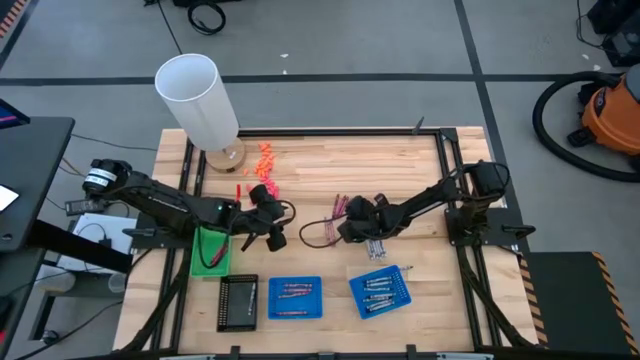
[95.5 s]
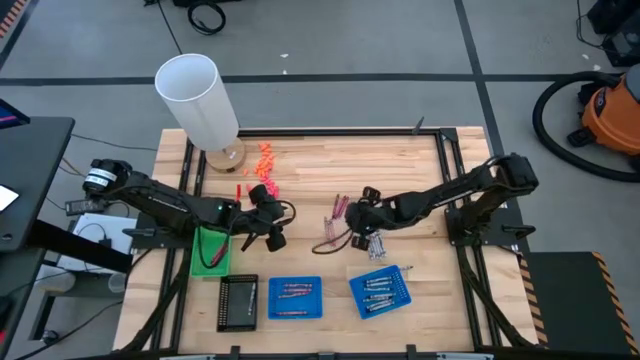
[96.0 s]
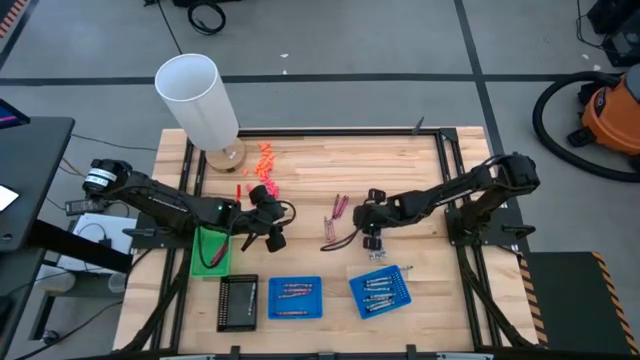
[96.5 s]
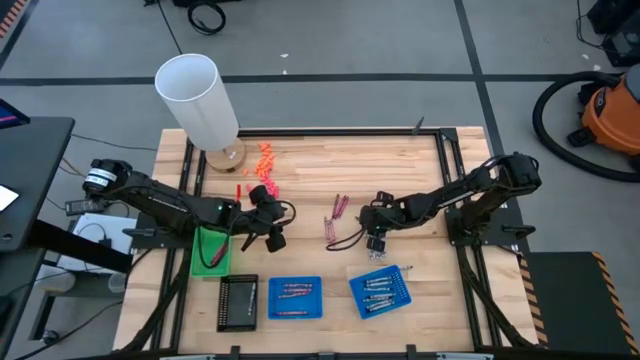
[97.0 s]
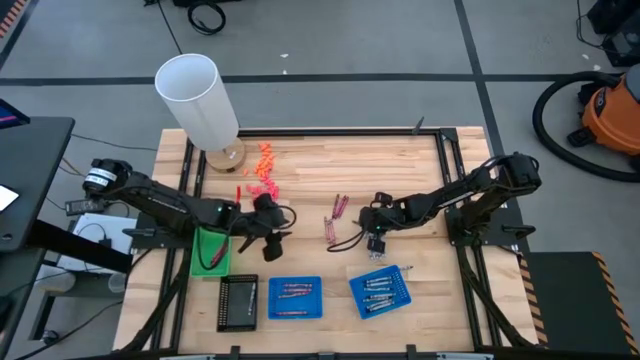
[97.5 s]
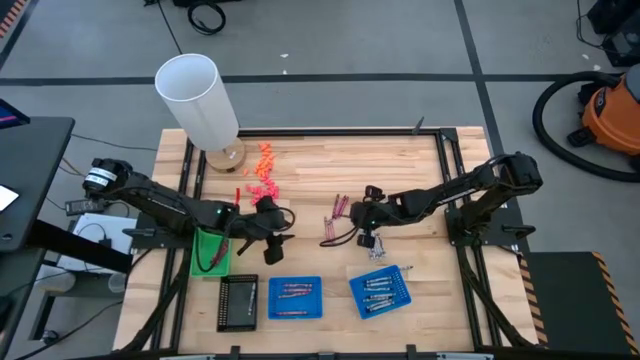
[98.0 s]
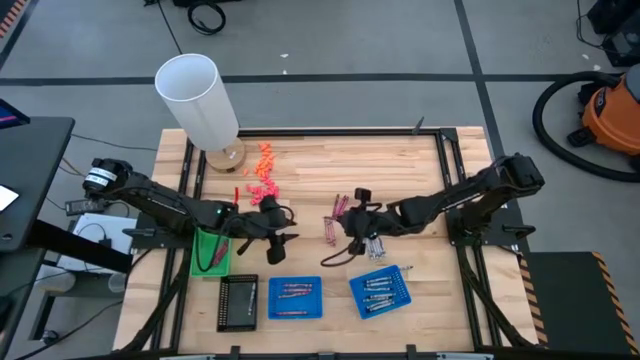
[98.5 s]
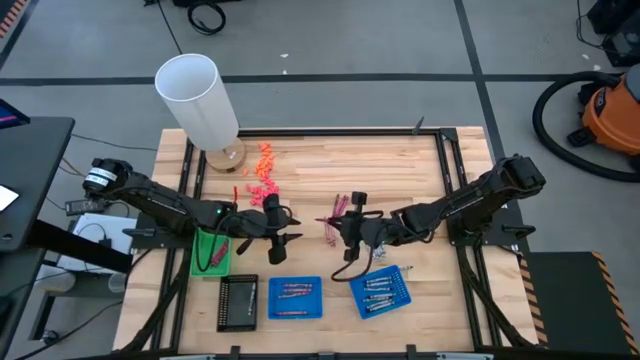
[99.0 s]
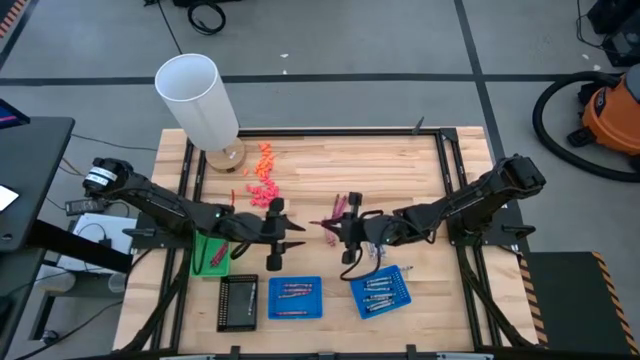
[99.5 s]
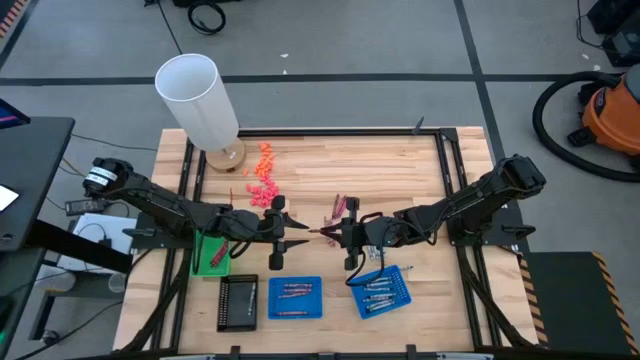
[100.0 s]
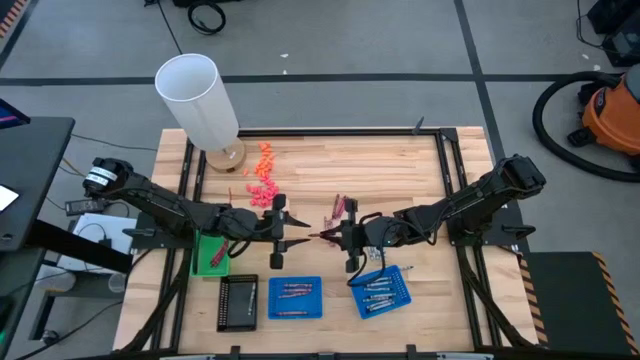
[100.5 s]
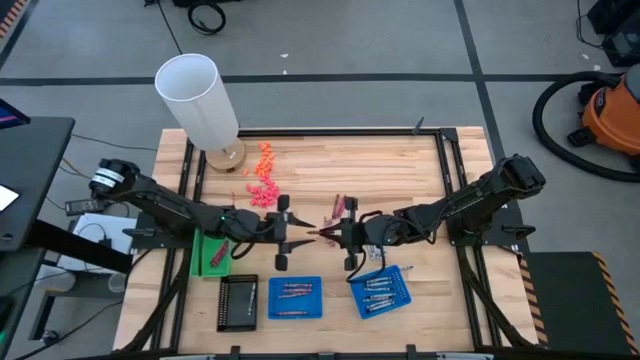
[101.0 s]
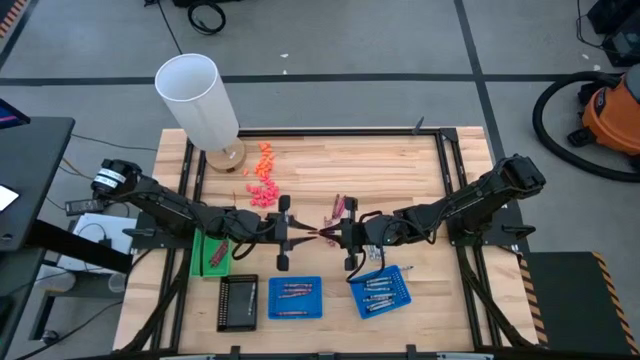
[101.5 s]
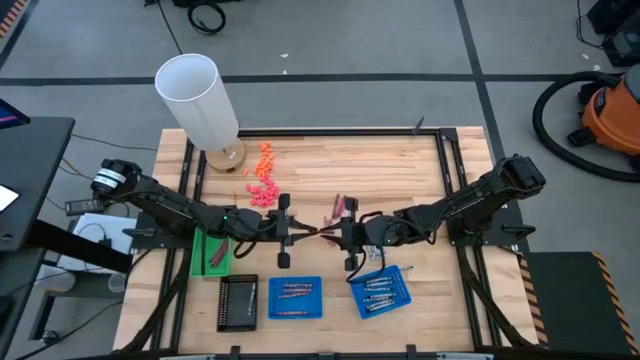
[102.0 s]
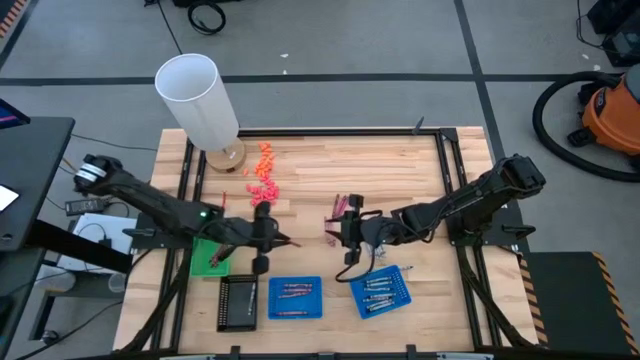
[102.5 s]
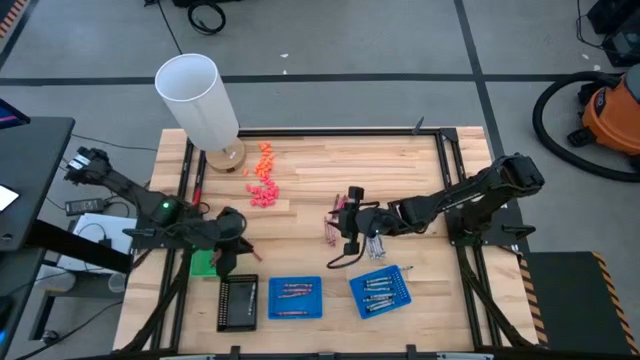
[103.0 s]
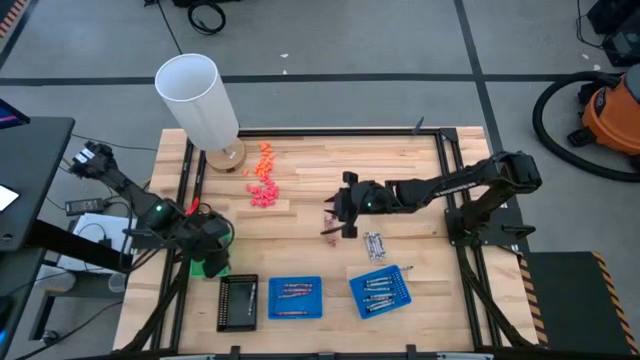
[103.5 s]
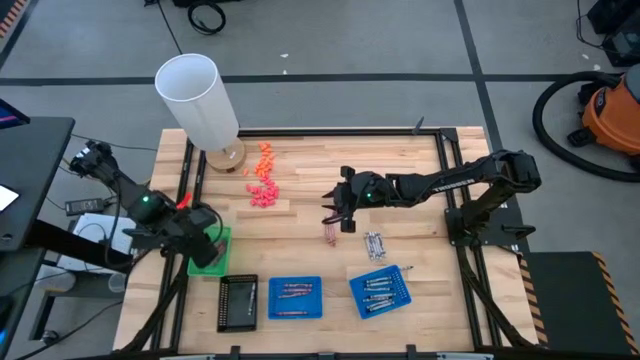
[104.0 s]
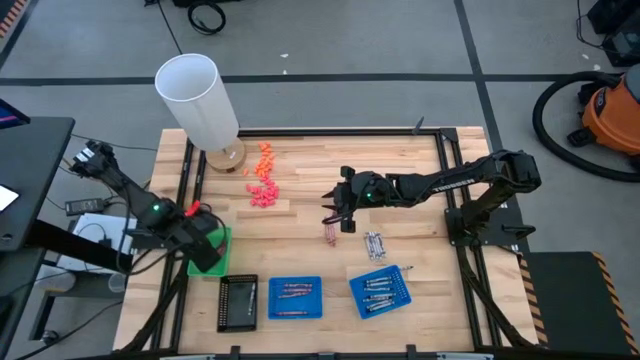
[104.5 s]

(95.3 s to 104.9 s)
Task: Sort crayons
Put the red crayon into the green basket

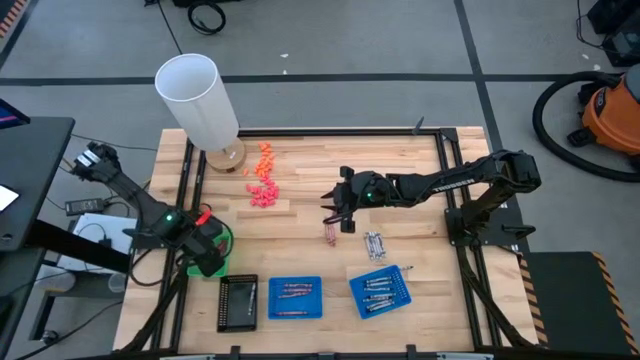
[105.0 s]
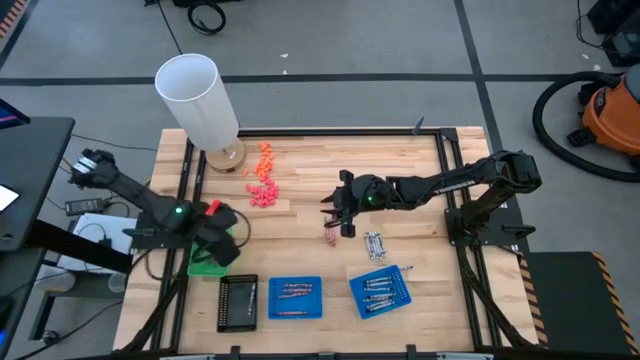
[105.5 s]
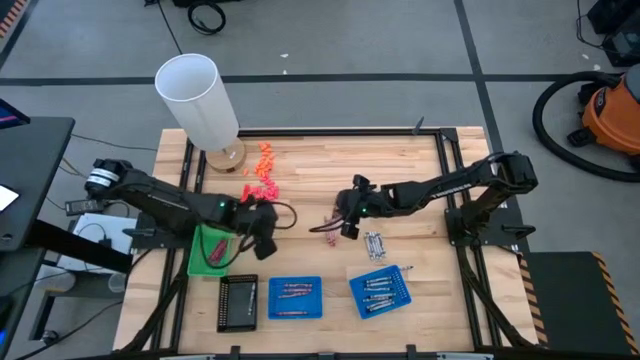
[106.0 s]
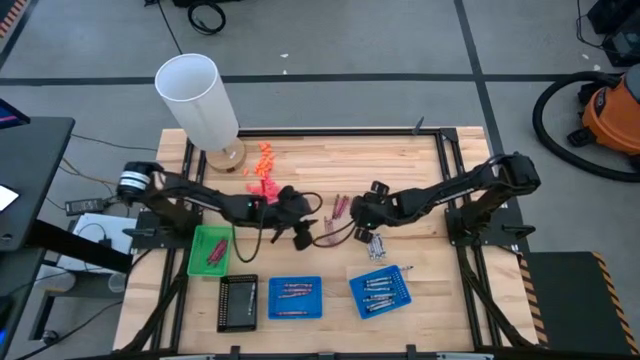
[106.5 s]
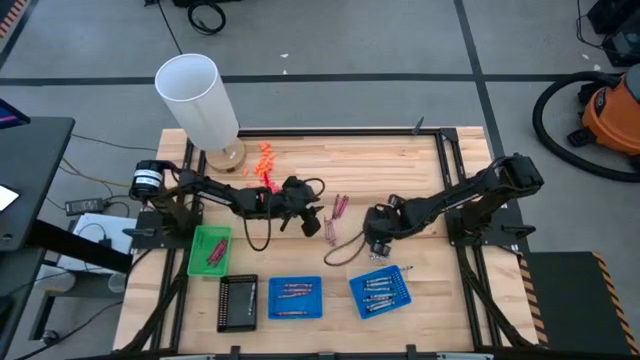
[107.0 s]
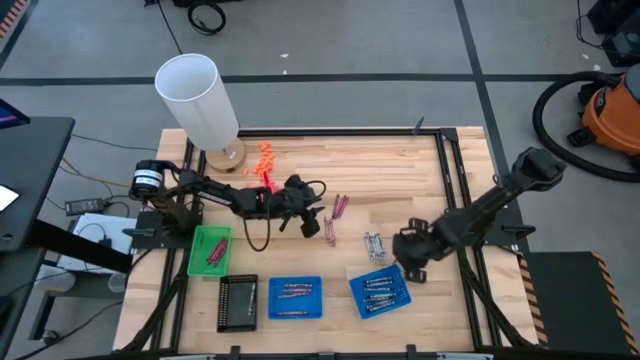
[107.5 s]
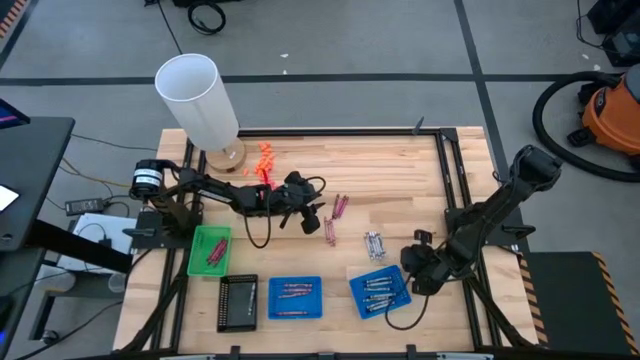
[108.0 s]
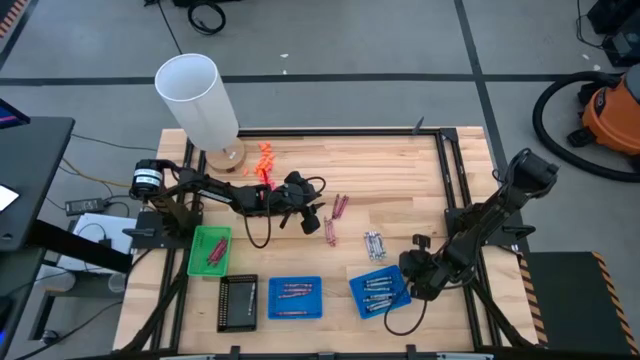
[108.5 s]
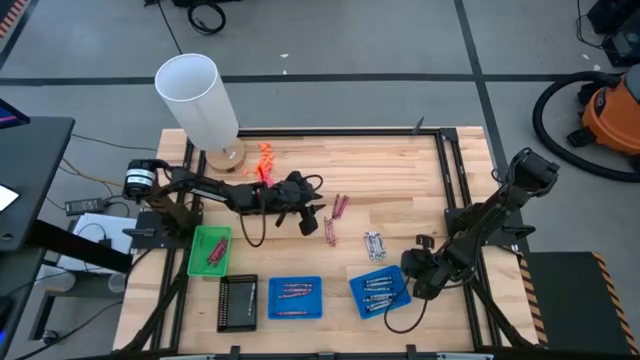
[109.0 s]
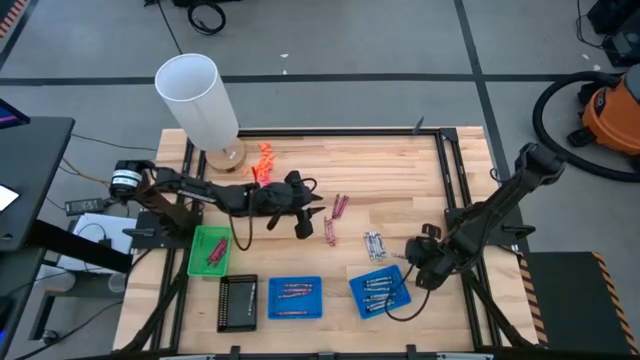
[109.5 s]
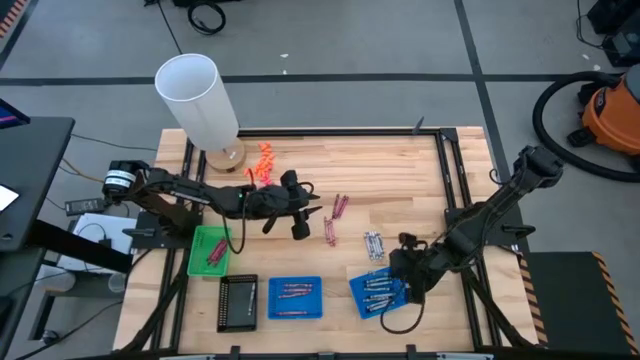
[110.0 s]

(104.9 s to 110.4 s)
Put the black crayon into the right blue basket

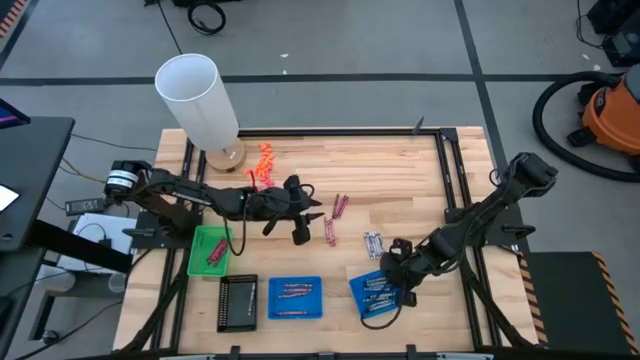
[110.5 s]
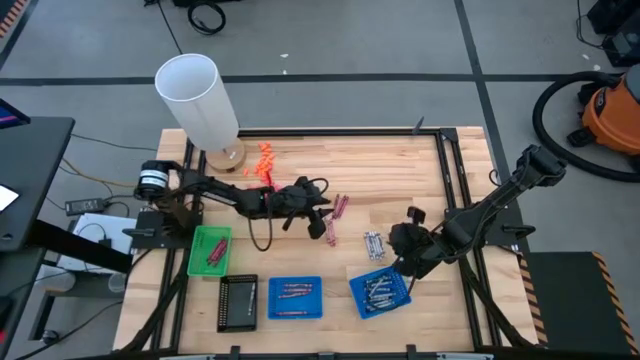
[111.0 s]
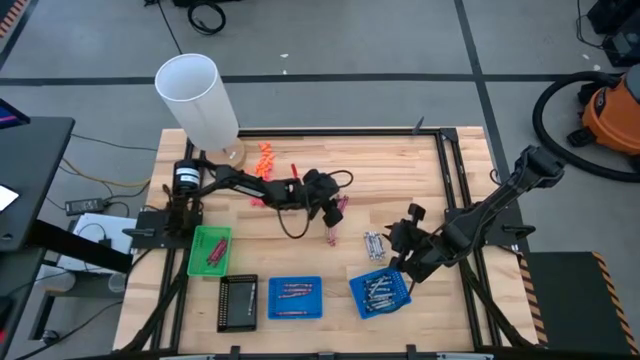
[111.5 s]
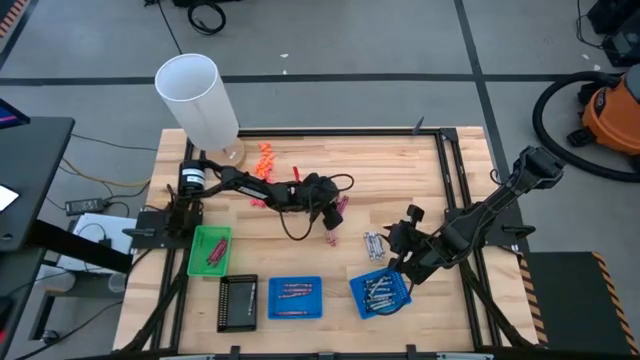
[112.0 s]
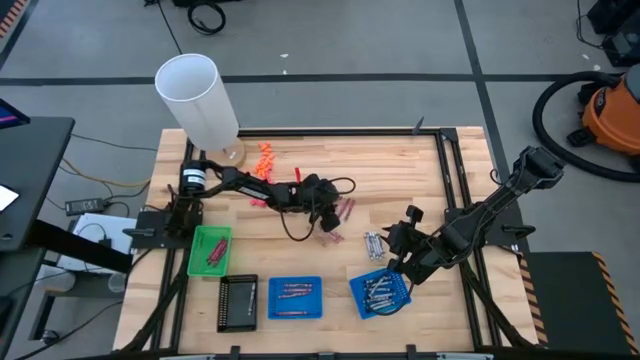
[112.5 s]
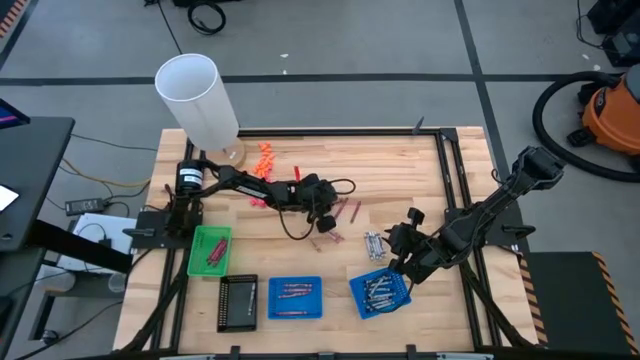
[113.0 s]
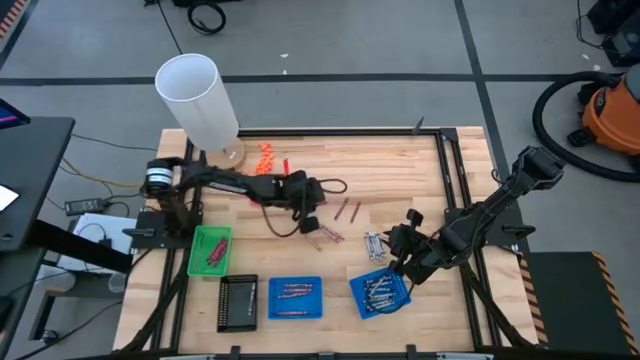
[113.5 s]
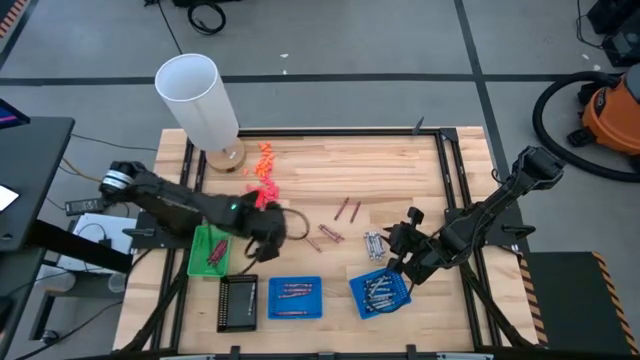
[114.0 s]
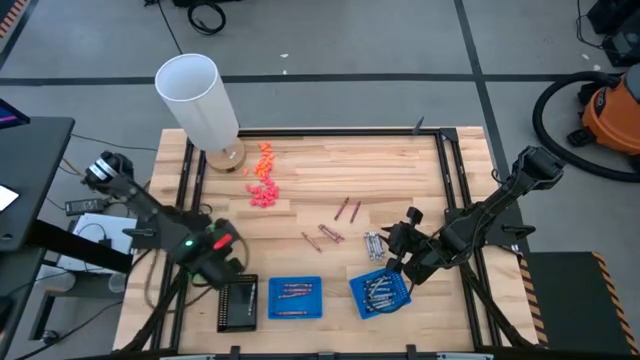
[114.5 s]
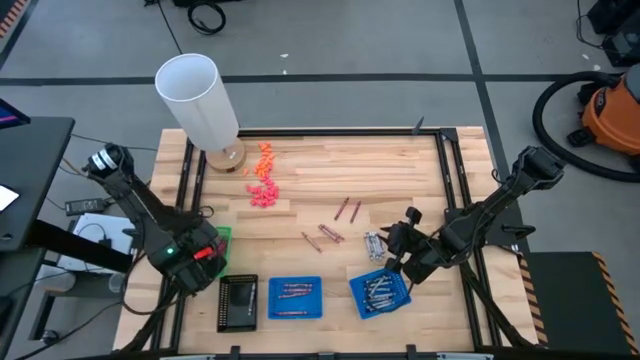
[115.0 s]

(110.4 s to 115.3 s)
Put the red crayon into the green basket

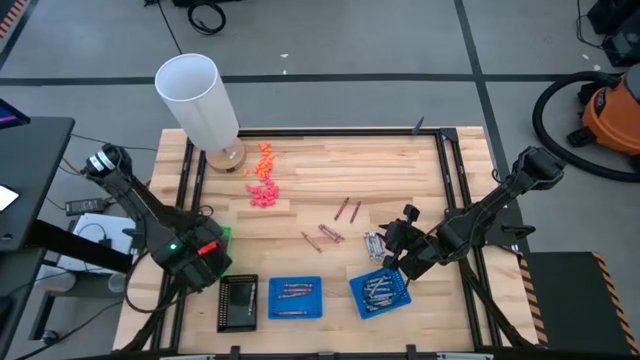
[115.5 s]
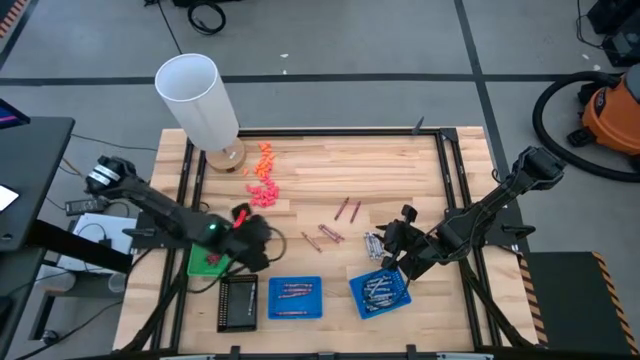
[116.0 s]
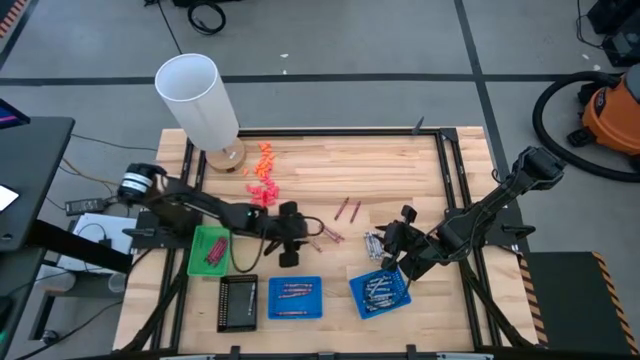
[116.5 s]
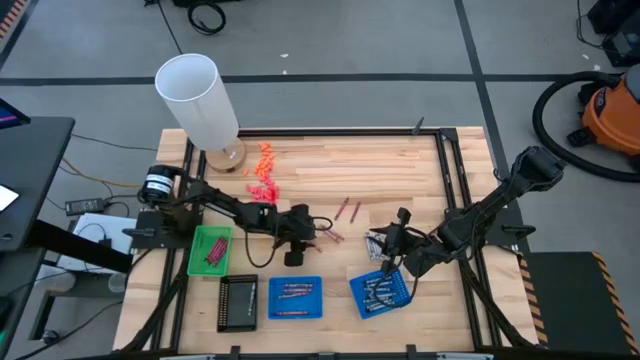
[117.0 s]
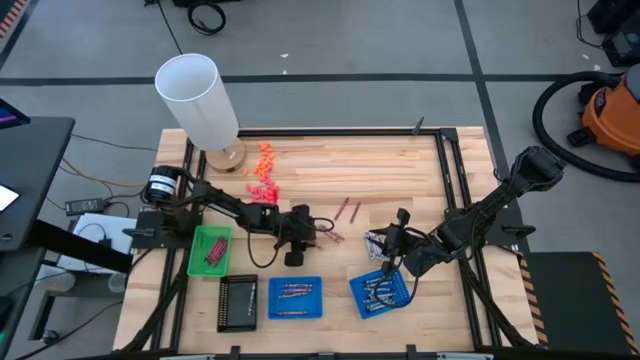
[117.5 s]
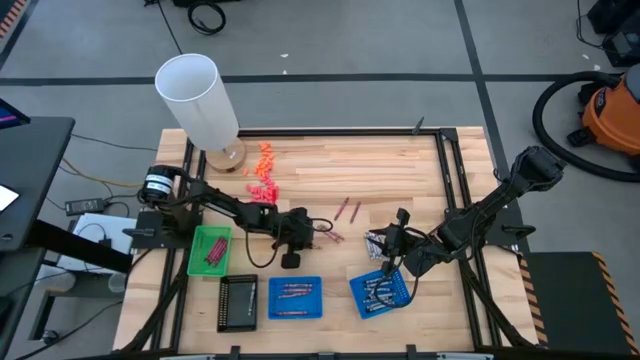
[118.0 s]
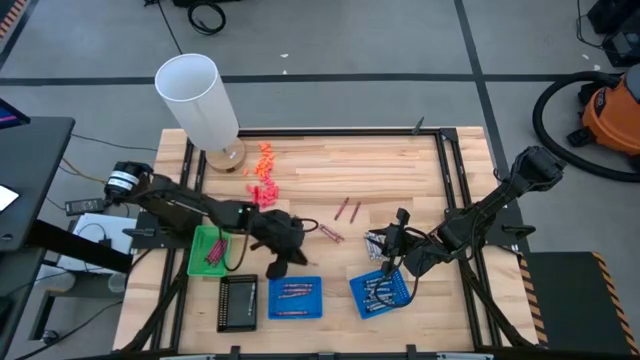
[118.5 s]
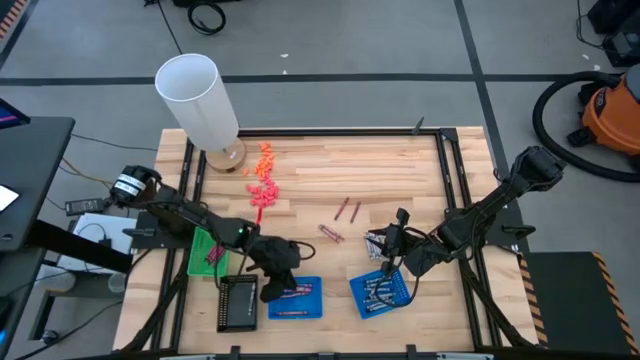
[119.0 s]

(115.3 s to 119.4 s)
Put the pink crayon into the left blue basket
